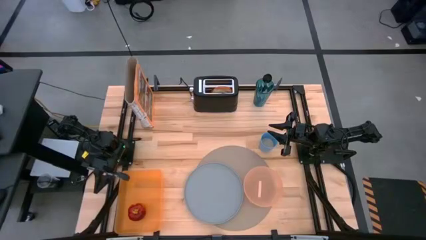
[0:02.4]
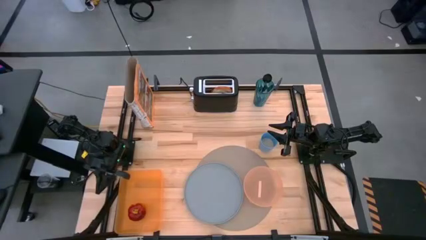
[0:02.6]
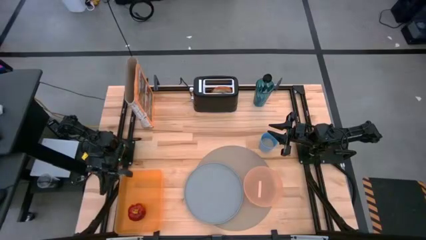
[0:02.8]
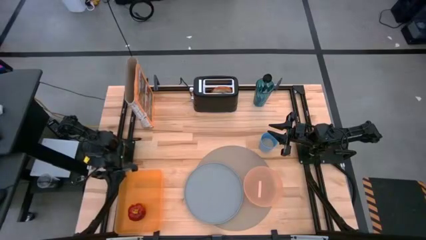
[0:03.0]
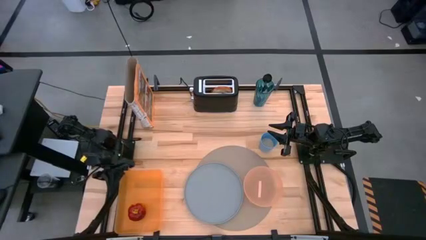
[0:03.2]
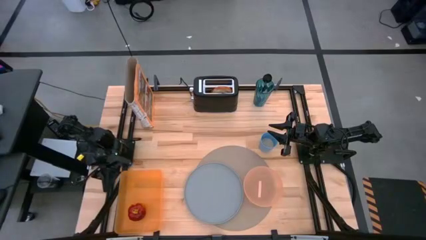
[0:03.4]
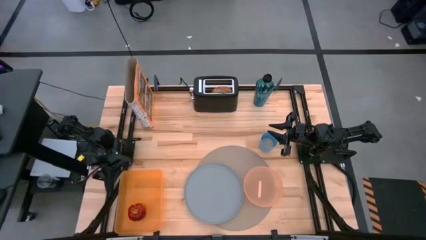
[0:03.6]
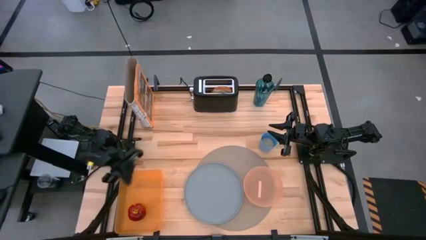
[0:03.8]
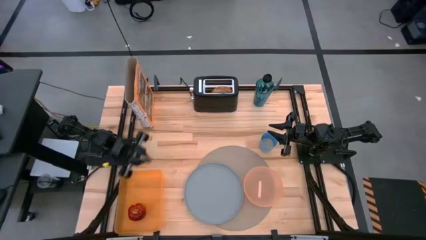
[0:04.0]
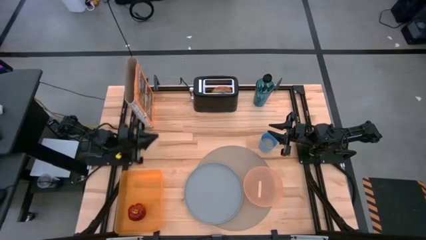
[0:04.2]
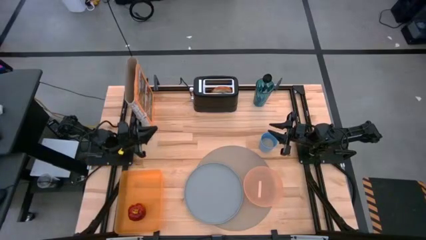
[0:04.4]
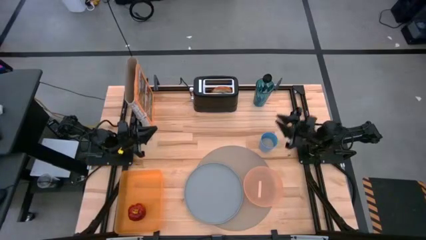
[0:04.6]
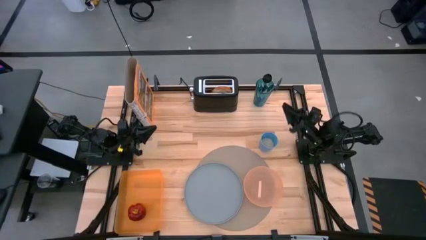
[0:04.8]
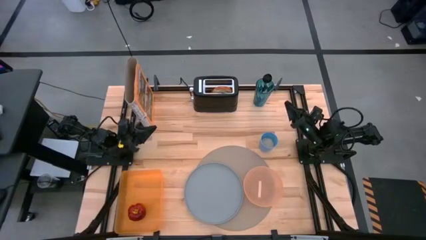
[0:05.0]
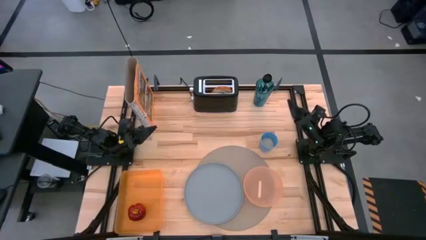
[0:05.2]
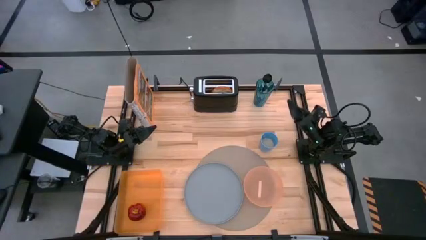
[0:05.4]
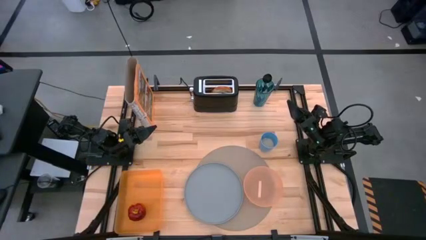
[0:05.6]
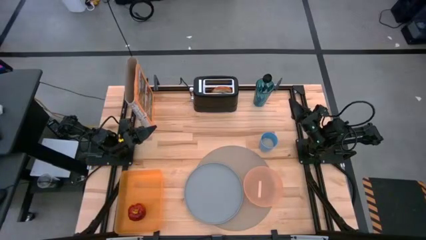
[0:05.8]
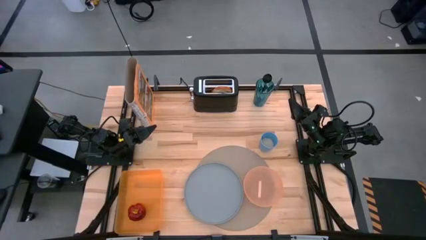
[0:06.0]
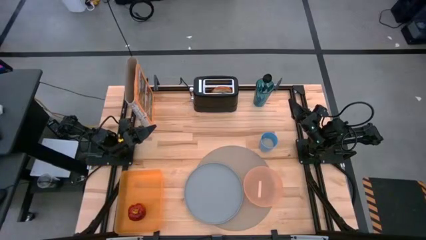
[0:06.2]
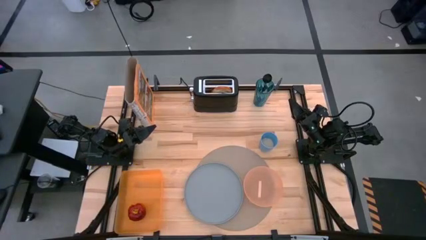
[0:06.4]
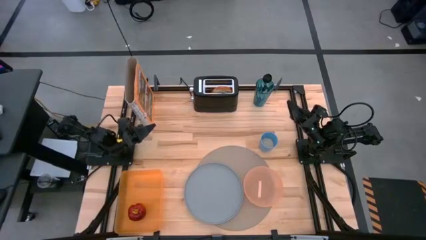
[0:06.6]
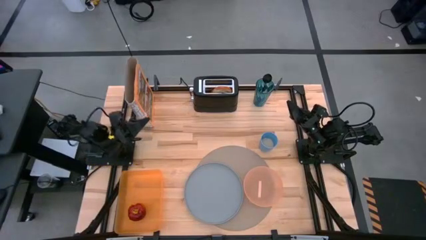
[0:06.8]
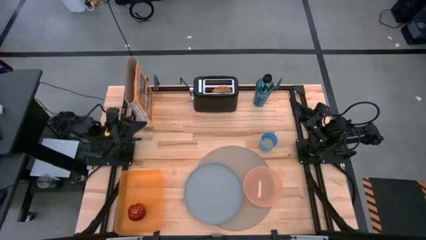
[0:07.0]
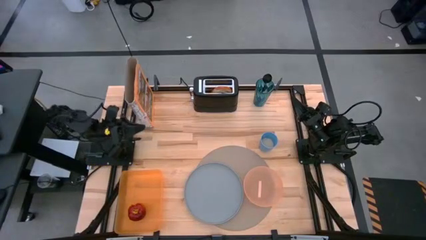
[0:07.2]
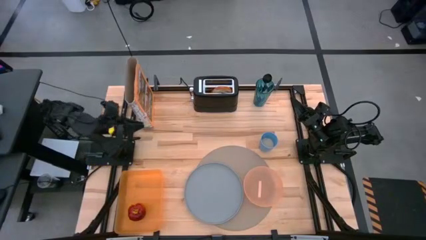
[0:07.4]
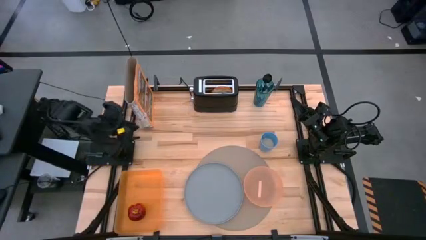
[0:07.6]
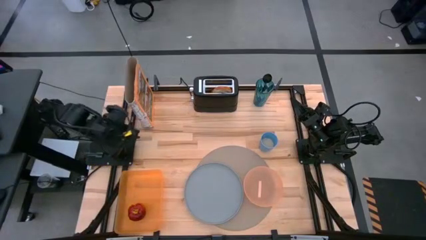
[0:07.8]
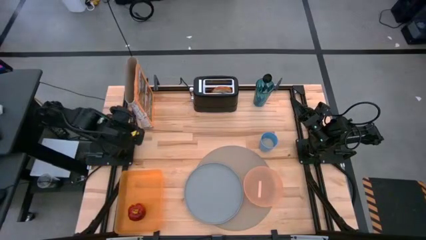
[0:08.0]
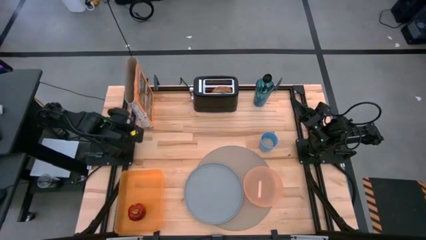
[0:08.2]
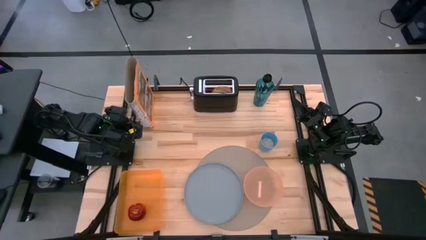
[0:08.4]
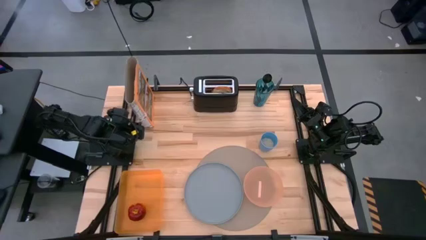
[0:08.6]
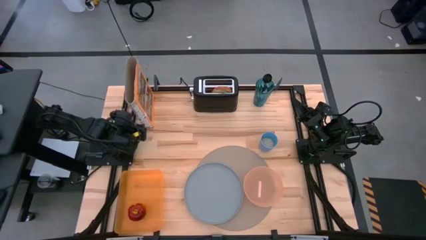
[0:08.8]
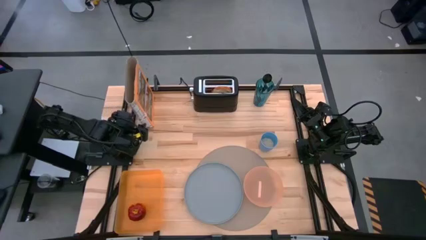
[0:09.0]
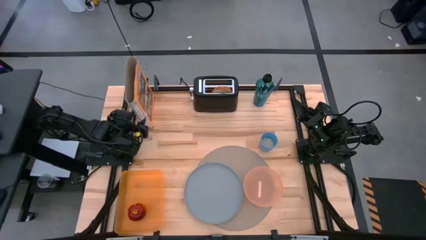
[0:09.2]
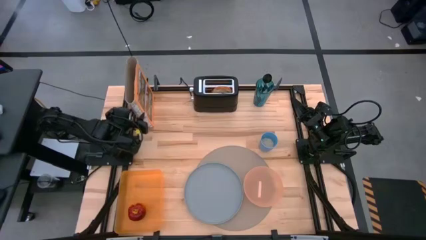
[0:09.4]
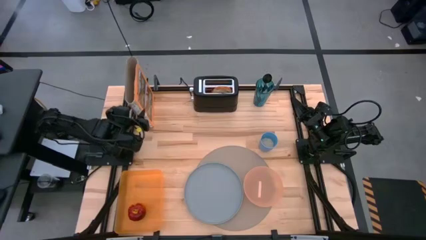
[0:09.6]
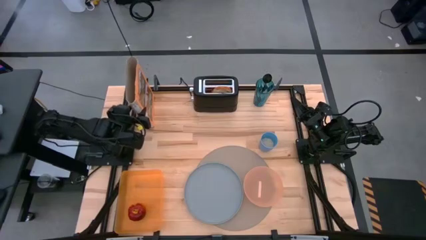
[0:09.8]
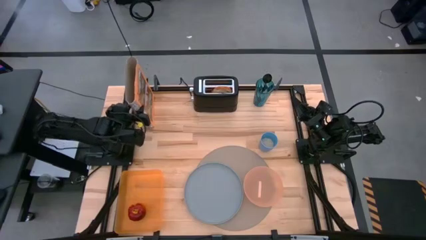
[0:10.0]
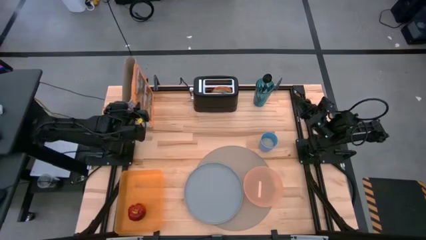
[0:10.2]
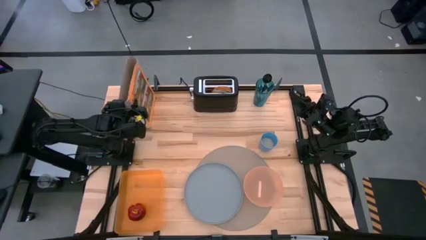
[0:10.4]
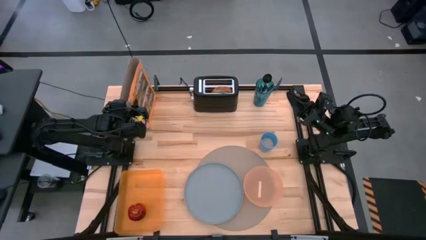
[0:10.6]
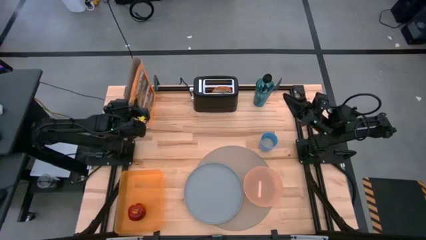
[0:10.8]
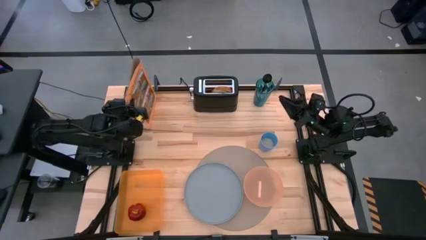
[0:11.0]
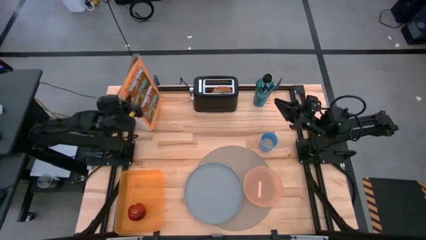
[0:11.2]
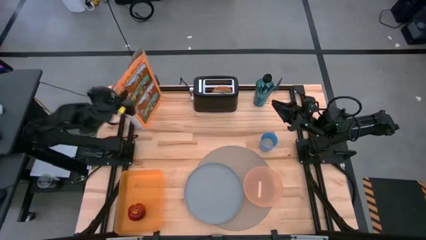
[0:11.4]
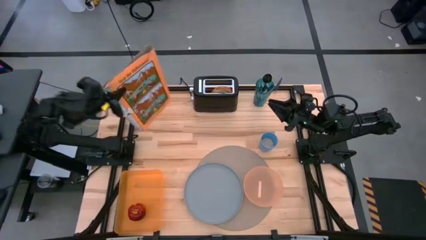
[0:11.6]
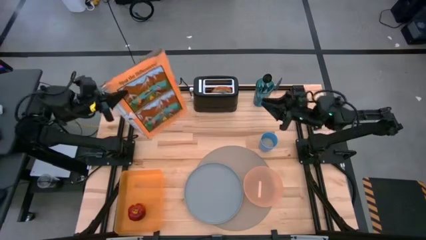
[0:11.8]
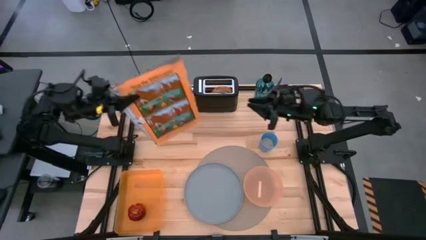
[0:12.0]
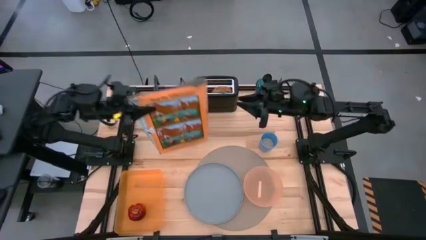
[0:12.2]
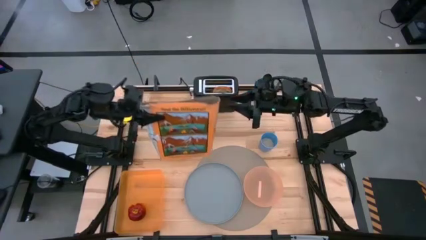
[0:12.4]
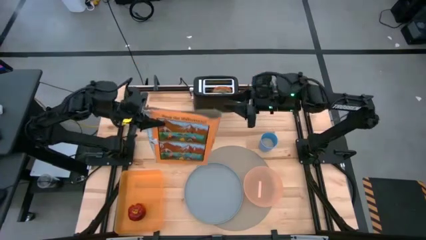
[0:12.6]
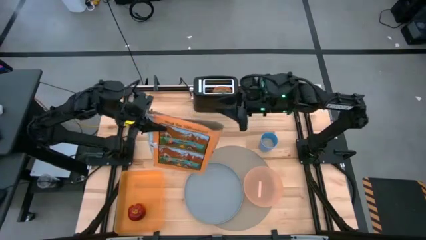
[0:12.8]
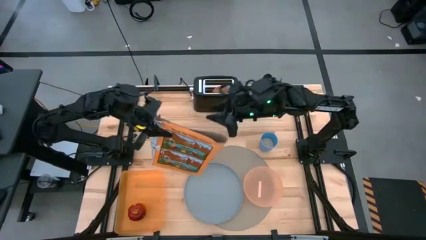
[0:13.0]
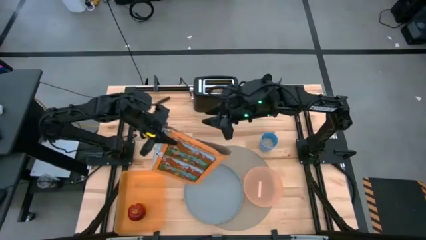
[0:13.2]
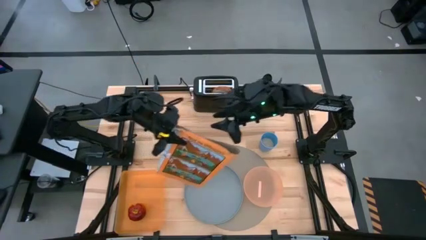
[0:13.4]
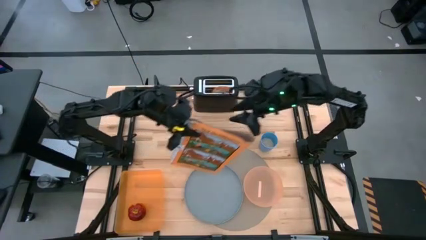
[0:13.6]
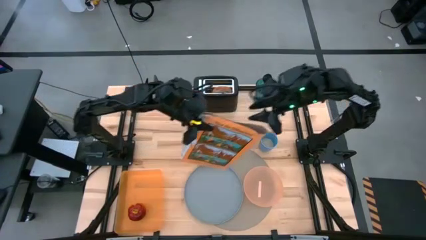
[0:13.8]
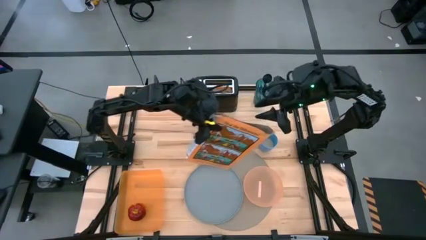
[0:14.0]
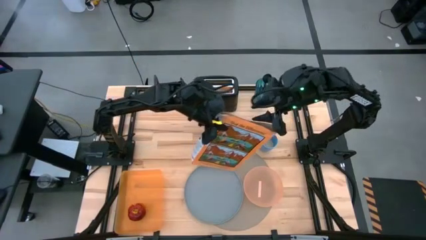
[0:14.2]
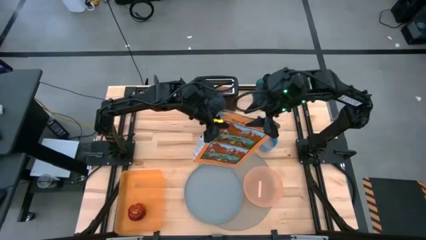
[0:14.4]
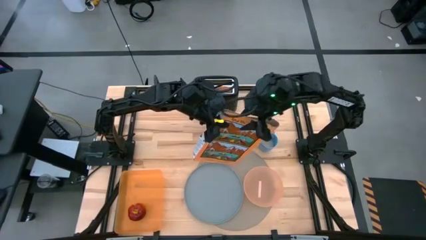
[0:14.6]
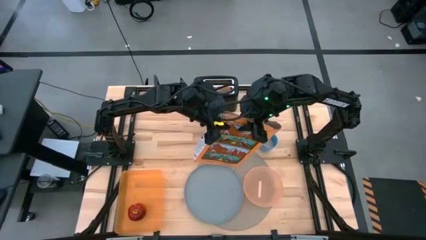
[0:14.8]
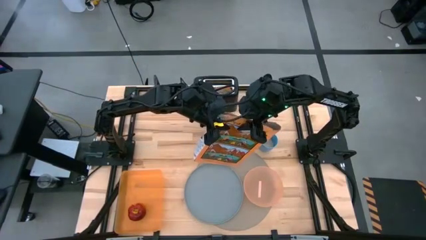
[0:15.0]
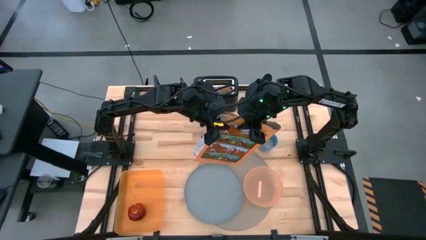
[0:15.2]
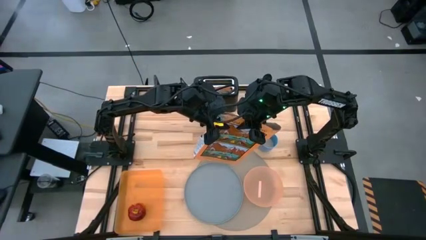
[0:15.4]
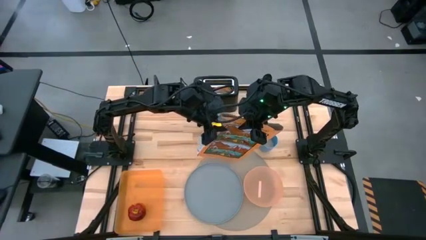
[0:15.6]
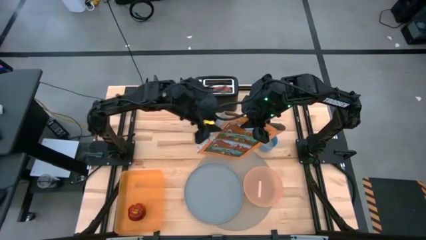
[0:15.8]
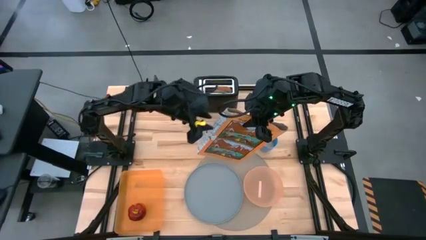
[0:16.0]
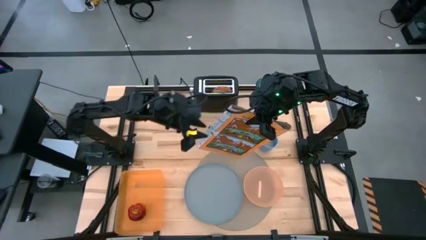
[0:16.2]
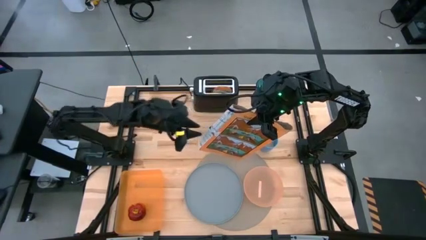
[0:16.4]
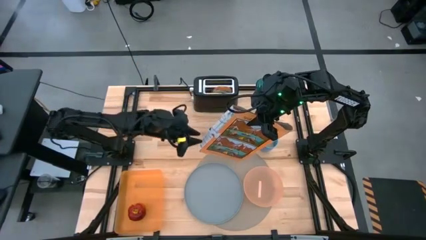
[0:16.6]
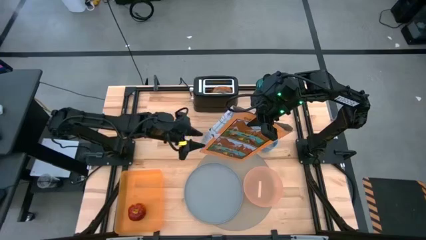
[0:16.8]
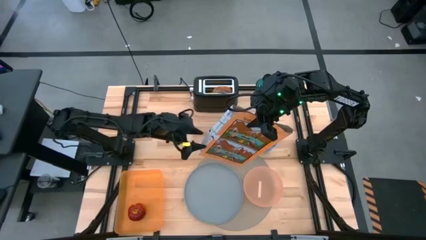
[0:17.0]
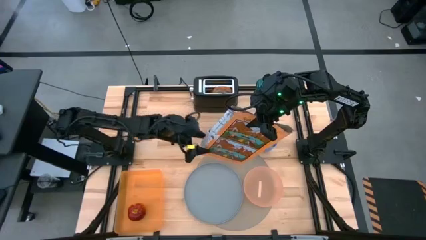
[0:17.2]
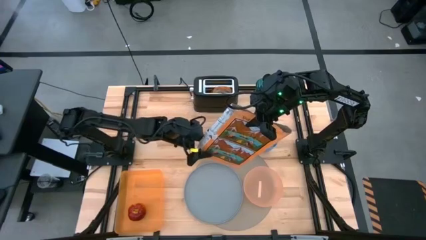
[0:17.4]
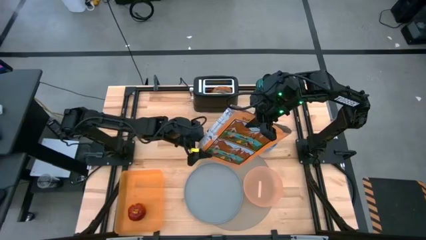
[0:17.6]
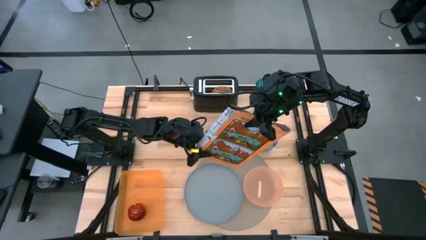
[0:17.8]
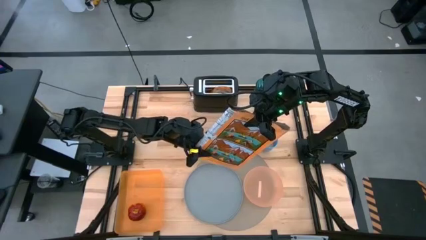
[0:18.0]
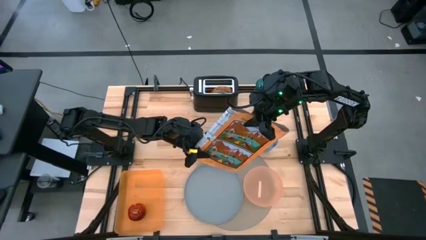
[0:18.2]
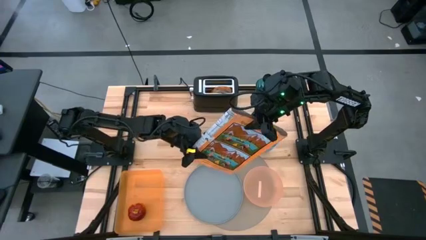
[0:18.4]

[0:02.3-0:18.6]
Task: Arrange a breakfast setting
Pour the cereal into the light orange bowl on the table mat
